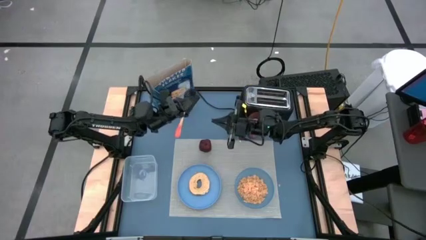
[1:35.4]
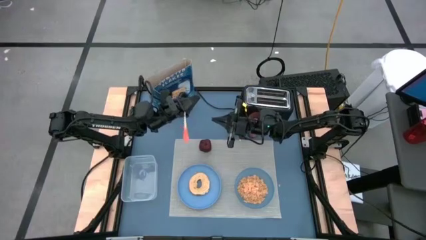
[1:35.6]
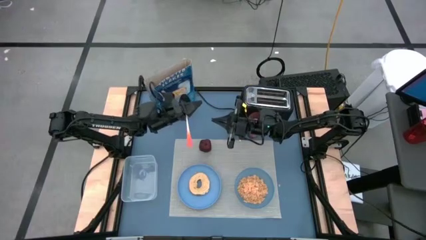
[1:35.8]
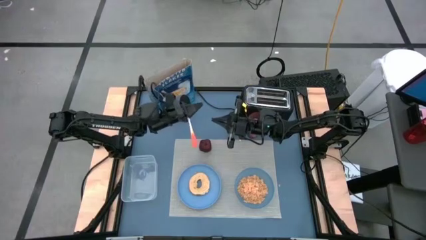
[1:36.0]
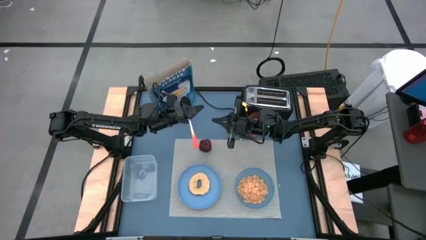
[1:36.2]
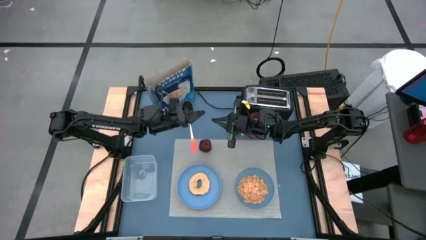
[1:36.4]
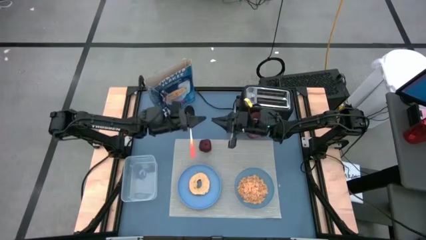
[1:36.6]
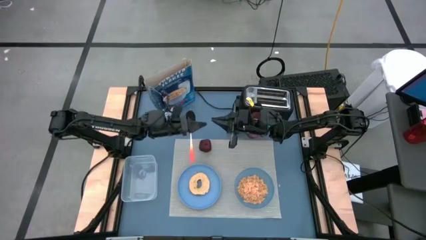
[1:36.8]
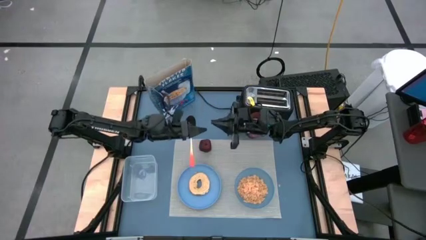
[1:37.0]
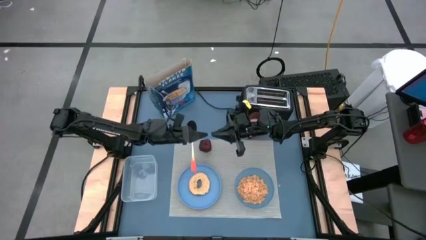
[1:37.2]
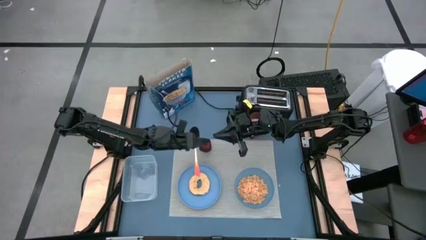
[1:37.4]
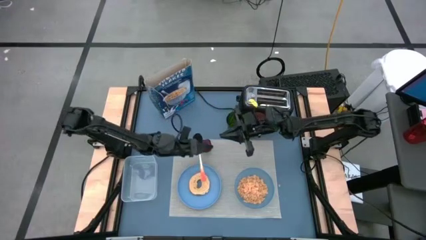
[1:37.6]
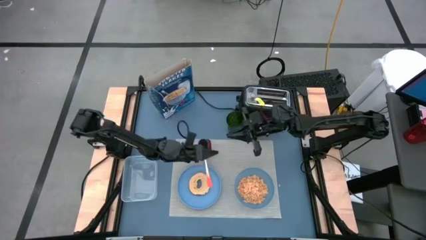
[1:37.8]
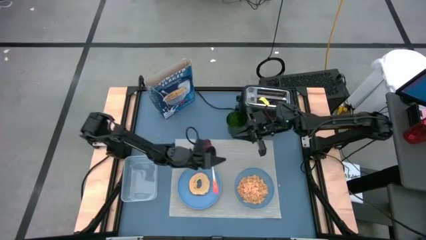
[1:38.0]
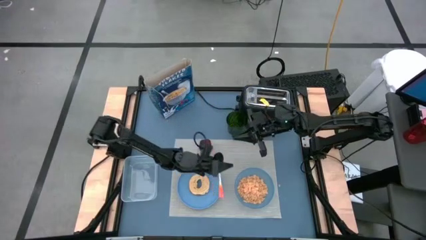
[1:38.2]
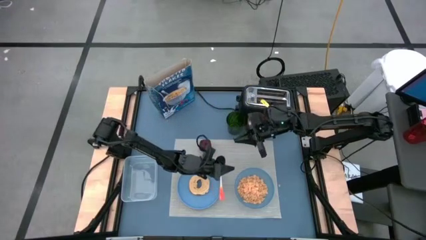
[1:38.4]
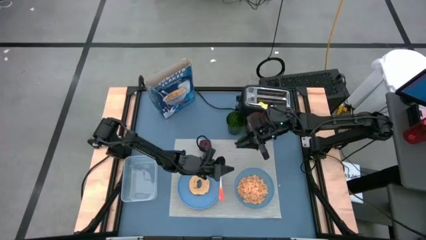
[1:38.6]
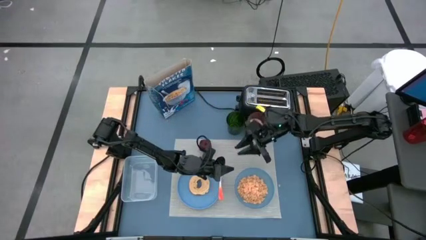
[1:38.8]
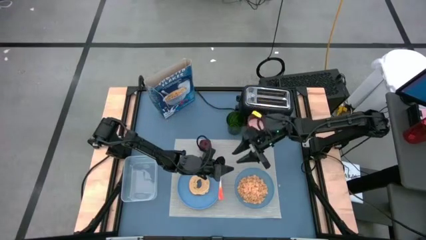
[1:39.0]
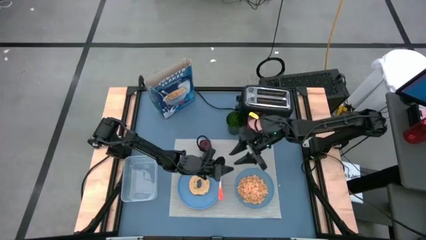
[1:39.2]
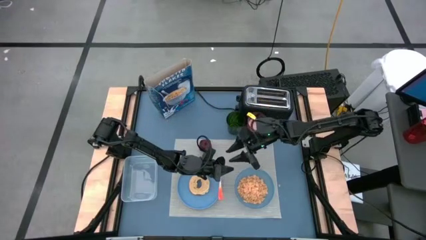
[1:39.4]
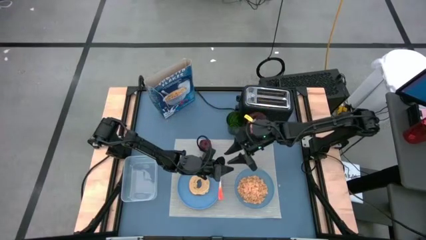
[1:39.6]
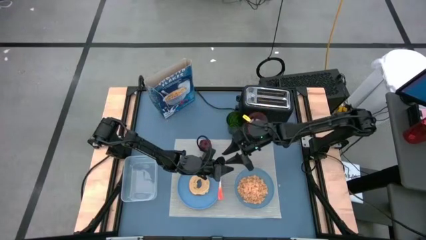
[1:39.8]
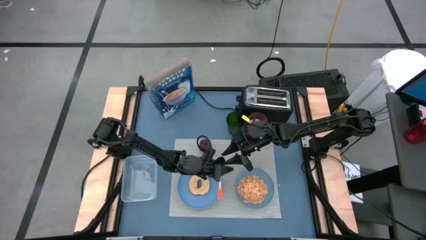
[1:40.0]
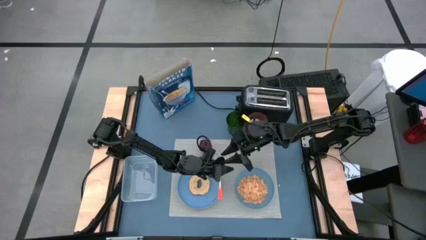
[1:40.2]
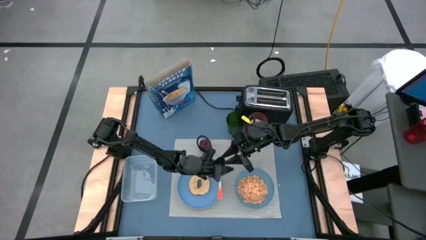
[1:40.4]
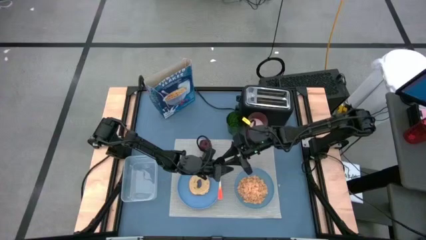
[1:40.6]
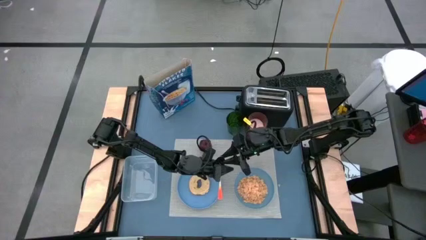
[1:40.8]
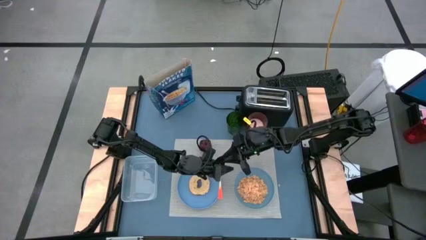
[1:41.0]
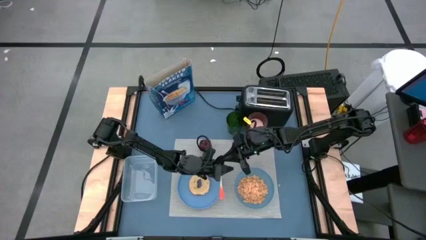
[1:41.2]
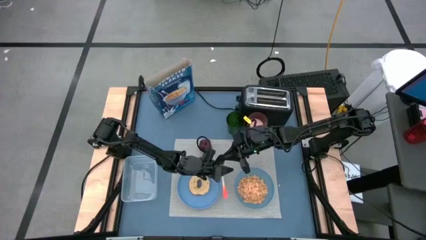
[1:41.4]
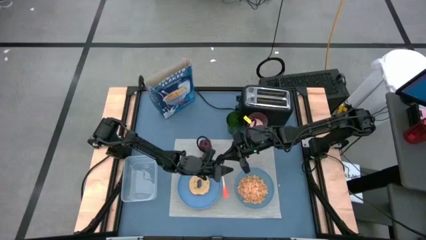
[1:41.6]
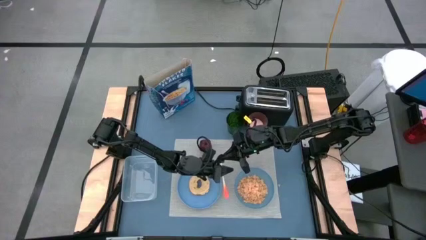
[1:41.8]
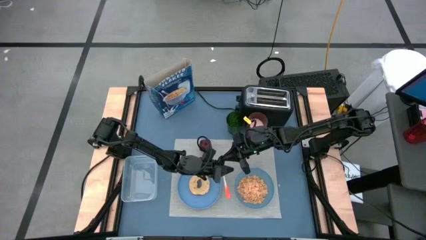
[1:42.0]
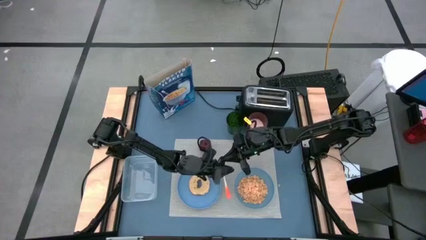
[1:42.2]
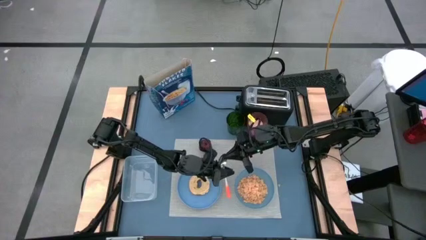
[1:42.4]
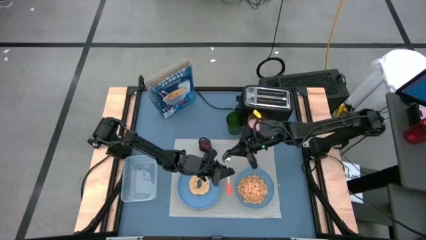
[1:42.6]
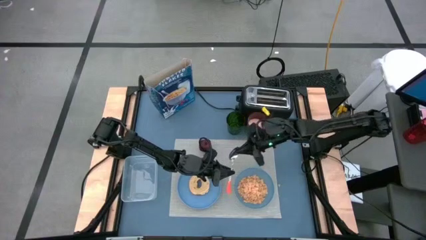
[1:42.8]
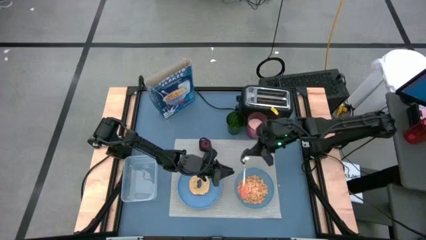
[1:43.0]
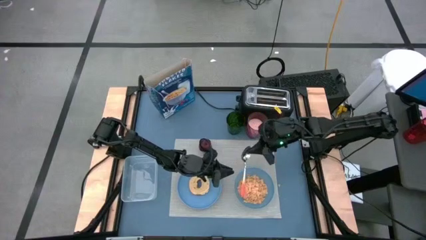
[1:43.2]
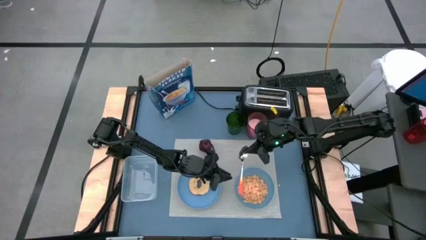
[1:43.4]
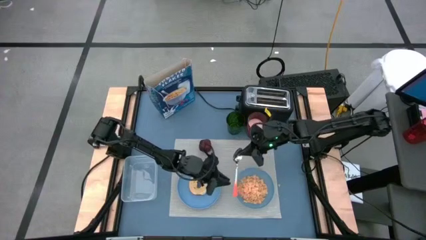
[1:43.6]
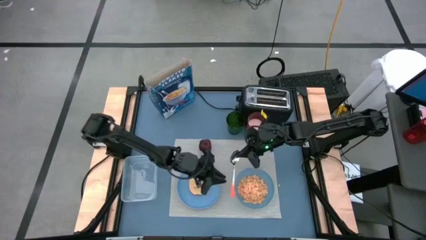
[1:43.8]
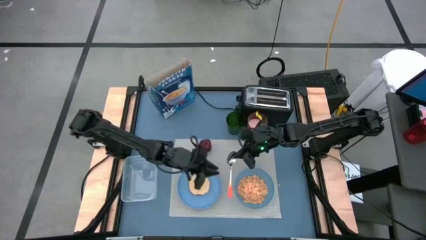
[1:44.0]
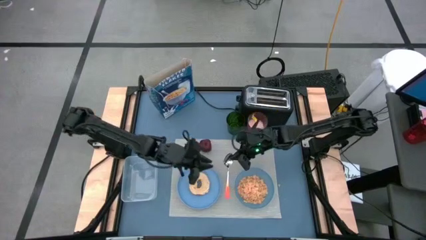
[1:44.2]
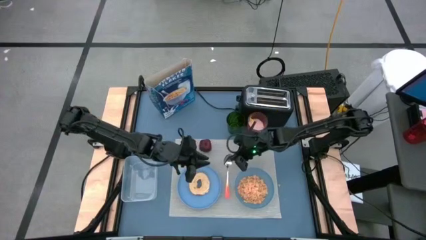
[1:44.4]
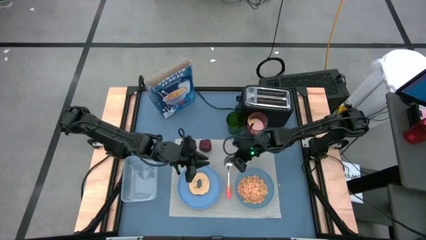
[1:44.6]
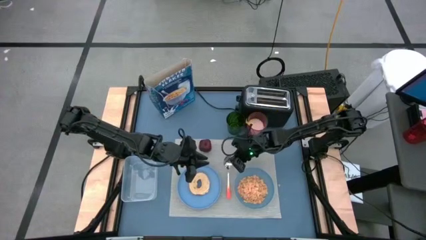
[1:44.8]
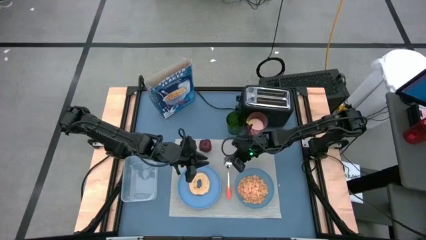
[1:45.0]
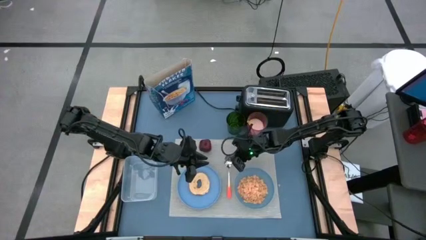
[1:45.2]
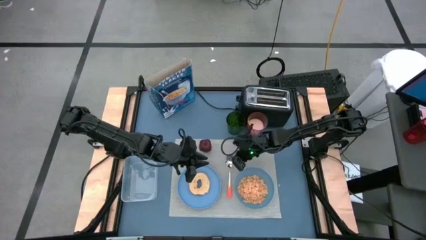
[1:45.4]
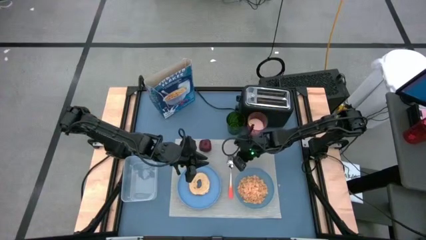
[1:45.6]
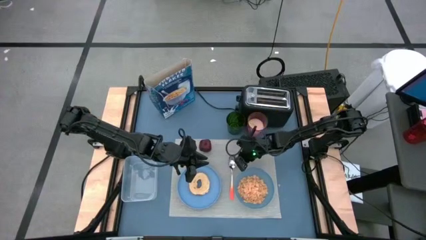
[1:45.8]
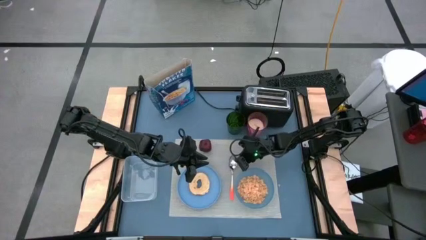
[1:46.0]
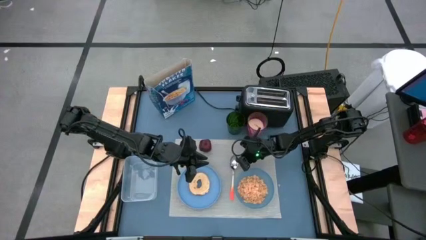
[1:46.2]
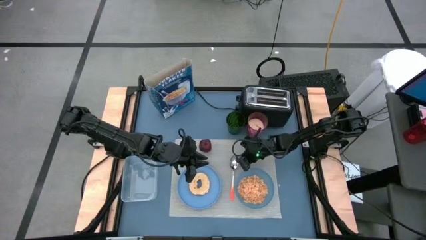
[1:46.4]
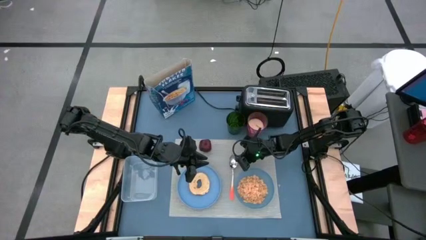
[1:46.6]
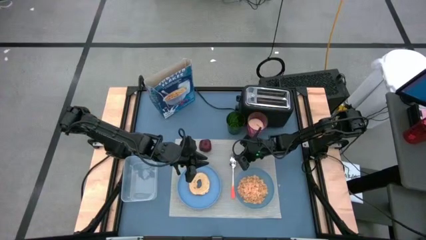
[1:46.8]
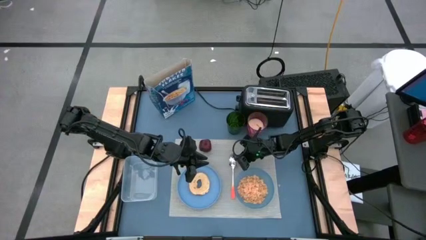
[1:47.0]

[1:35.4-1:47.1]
Task: Arrange a breakfast setting
Put the orange spoon on the gray placemat

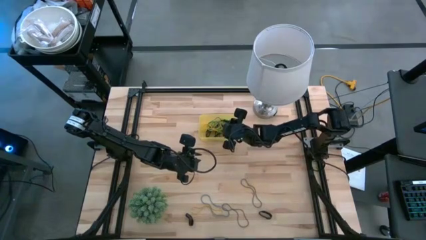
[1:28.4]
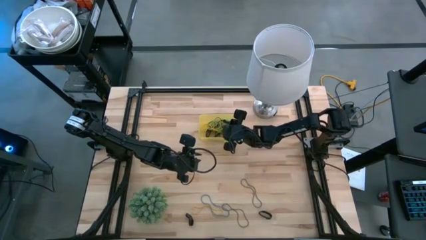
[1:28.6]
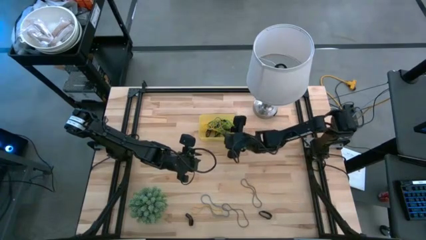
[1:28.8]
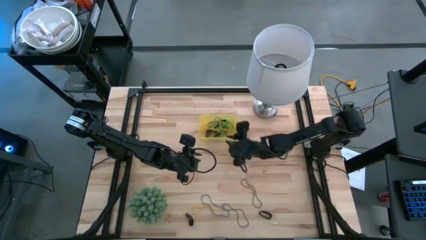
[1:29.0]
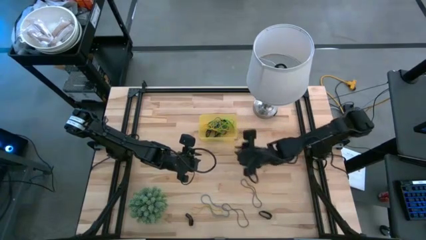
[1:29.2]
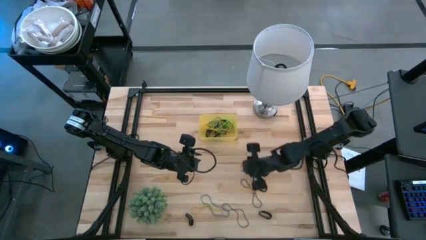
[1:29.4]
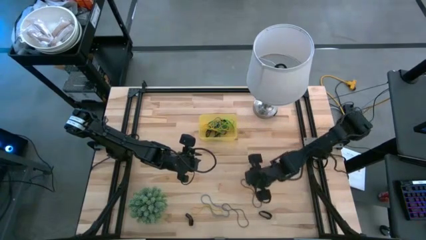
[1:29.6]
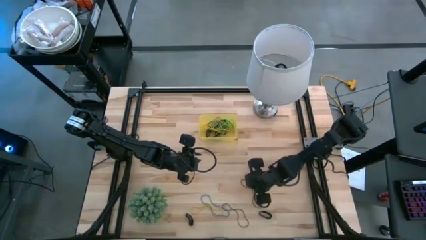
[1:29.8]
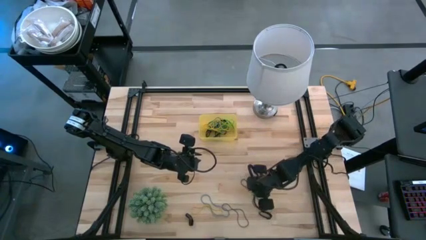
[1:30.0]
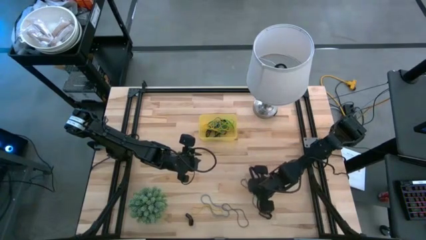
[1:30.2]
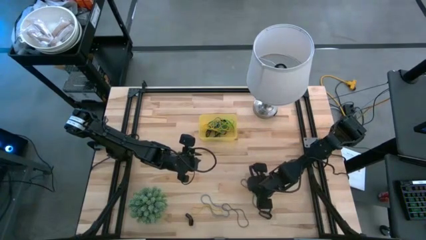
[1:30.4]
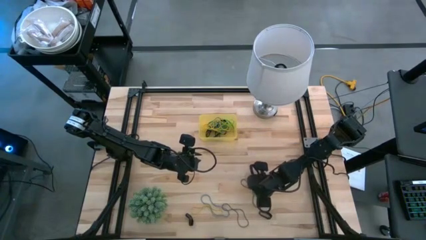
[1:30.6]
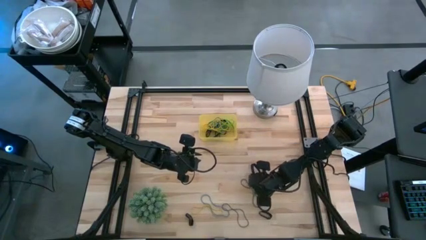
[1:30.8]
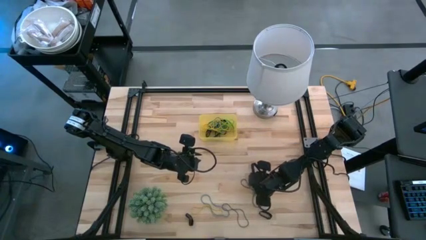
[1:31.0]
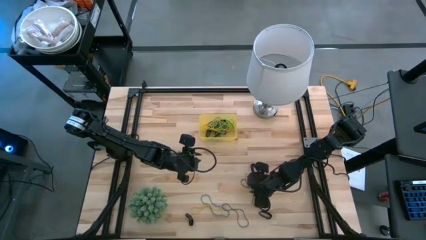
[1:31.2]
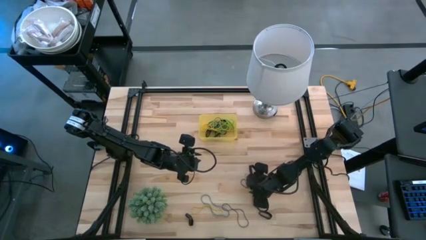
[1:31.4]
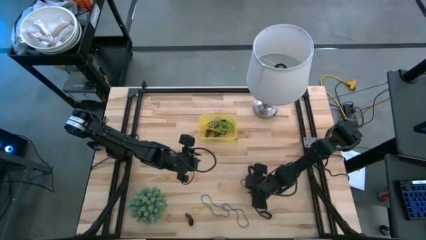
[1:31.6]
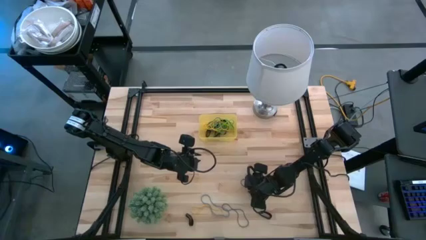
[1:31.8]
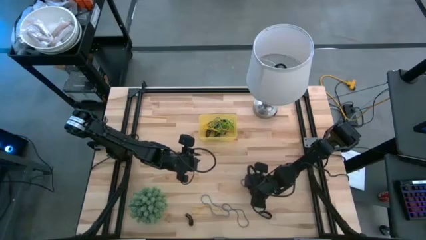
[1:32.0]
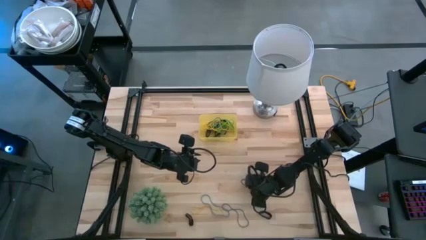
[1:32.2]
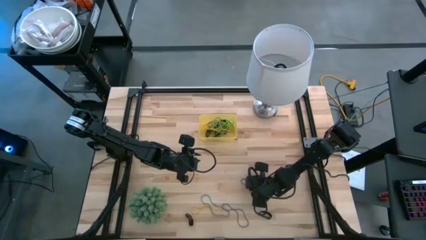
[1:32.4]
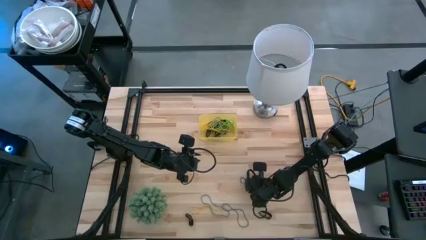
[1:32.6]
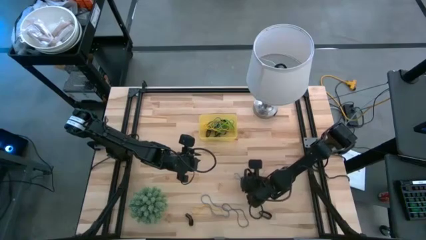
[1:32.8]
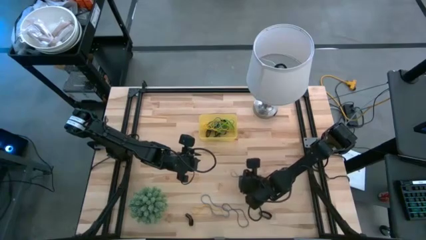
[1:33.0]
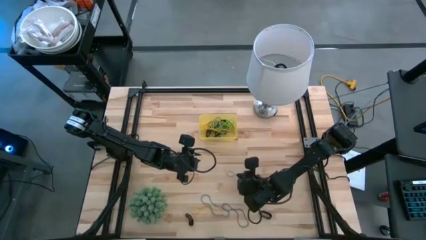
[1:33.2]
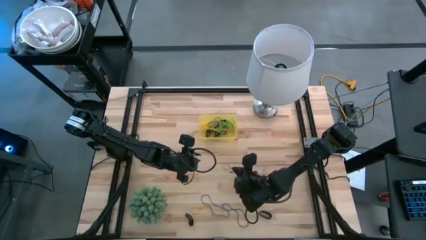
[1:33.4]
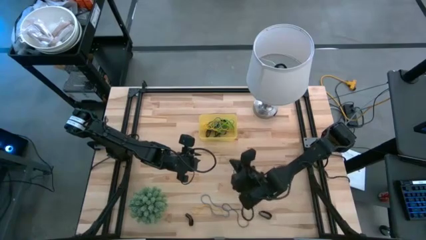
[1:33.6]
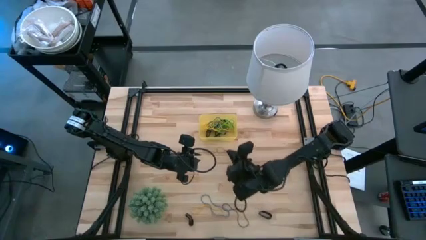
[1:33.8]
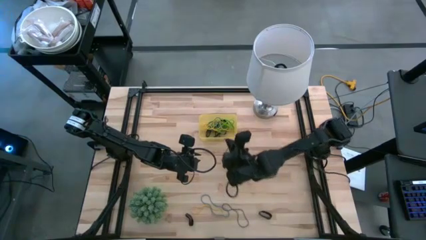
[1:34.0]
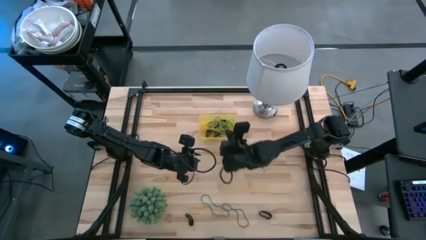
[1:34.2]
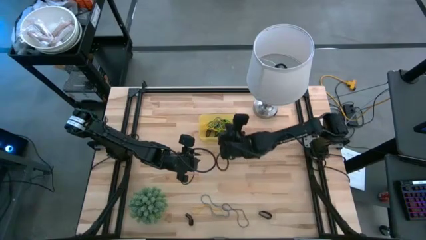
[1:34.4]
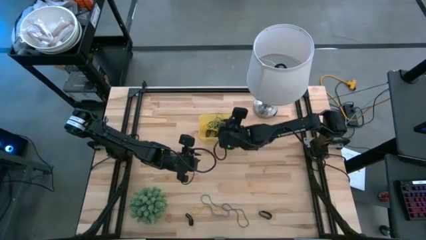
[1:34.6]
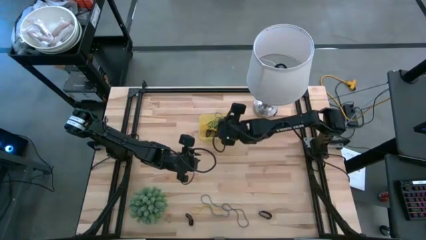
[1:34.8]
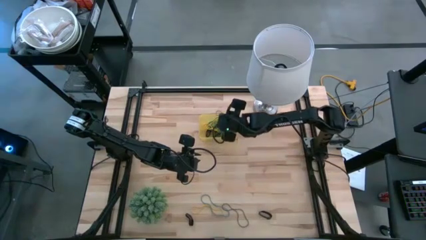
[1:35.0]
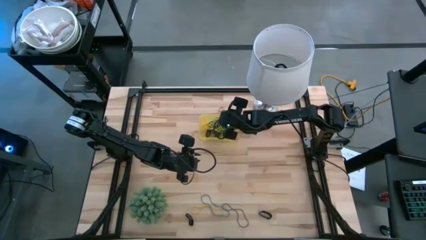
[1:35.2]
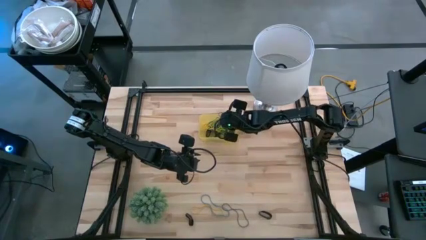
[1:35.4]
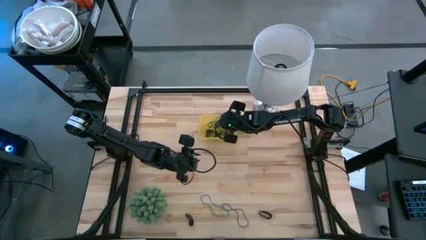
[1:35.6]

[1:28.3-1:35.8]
Task: Pick and place rubber bands into bin
Put the purple rubber band into the yellow bin
